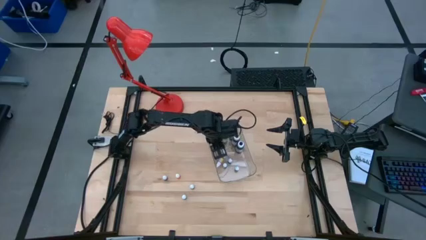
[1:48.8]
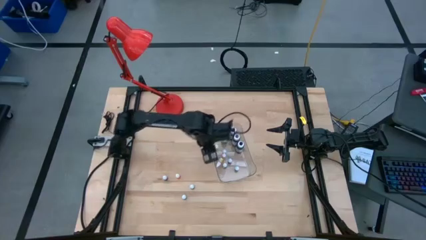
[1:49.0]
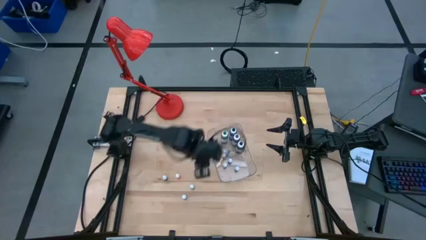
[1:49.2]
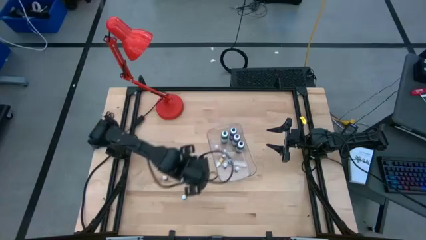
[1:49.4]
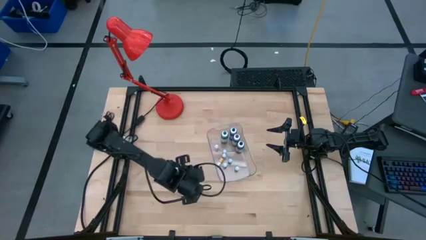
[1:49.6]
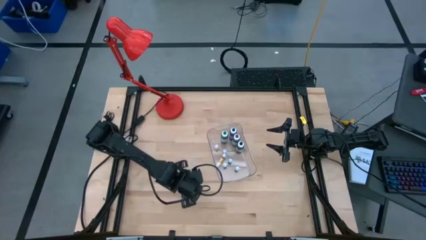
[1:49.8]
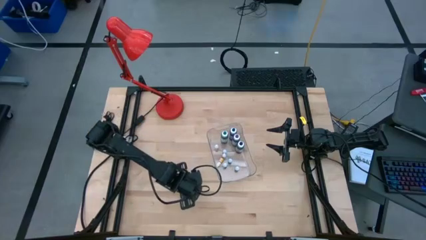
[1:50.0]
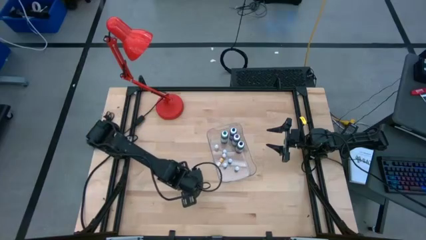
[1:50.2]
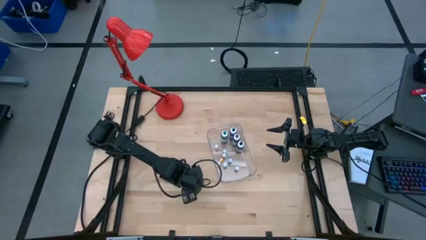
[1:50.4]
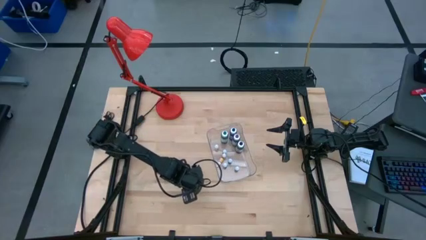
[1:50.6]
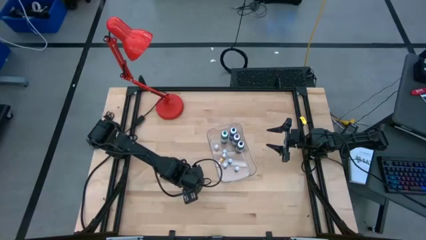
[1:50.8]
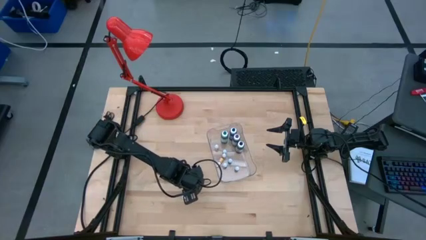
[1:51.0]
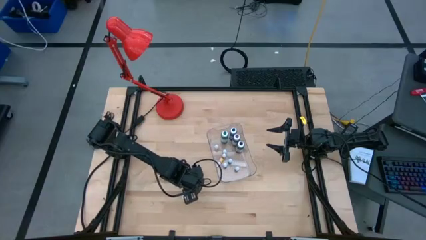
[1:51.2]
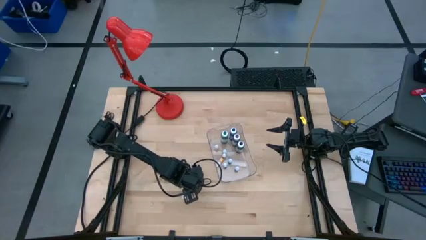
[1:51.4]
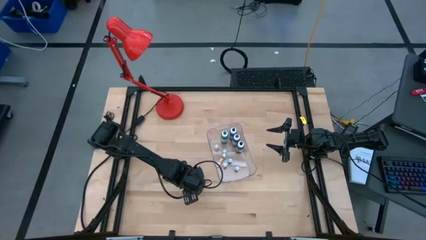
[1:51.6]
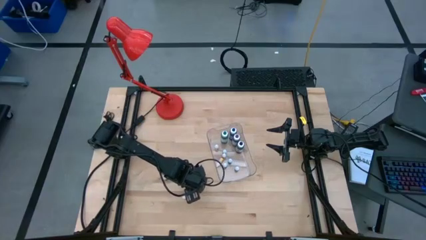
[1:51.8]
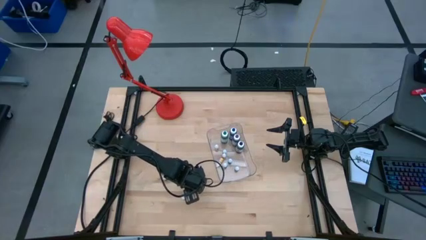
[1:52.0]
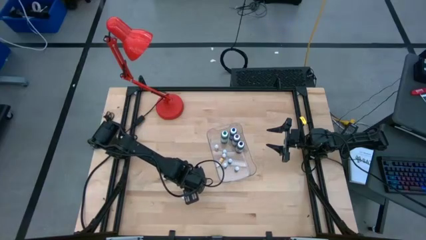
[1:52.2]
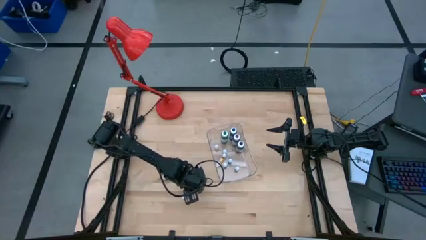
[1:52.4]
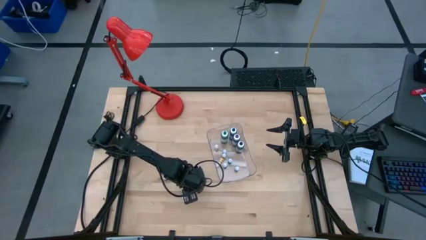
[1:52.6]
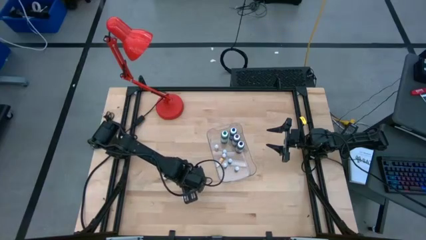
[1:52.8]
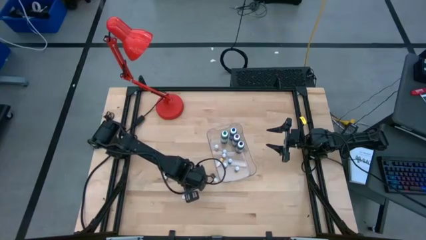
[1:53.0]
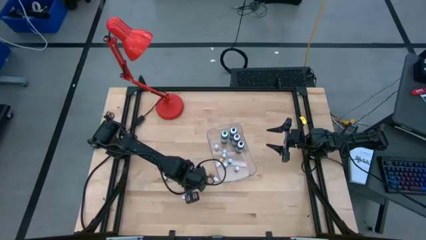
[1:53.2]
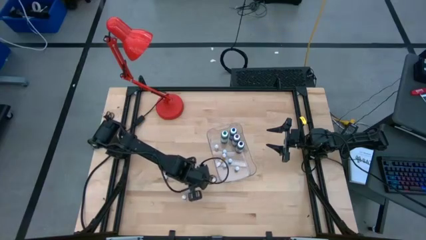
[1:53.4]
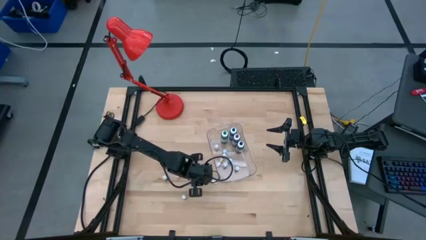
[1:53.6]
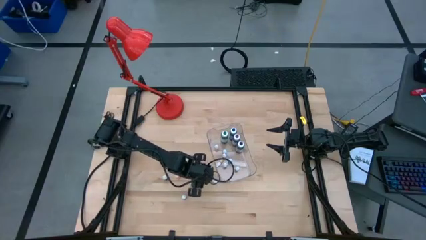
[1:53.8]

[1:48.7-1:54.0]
Task: Pick & Place food coloring
Put the purple food coloring bottle into the transparent container

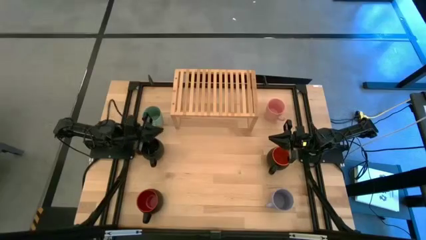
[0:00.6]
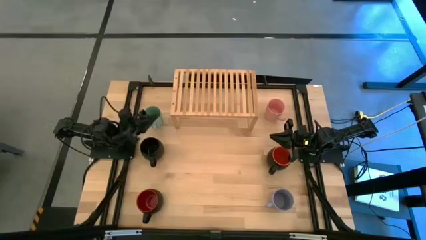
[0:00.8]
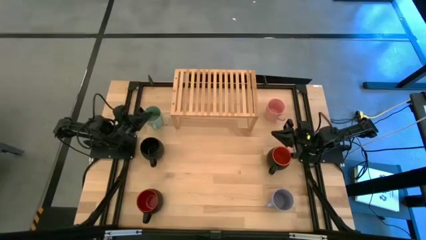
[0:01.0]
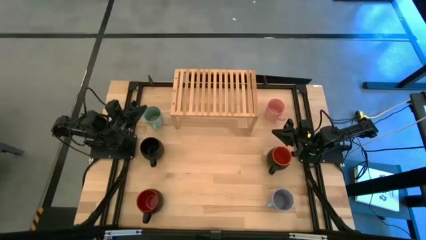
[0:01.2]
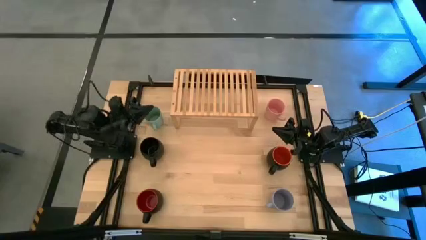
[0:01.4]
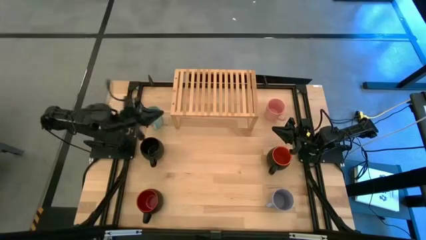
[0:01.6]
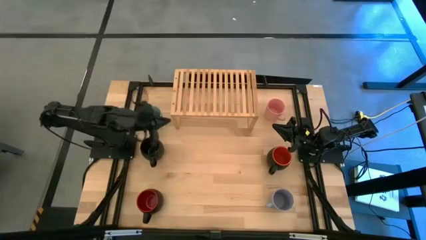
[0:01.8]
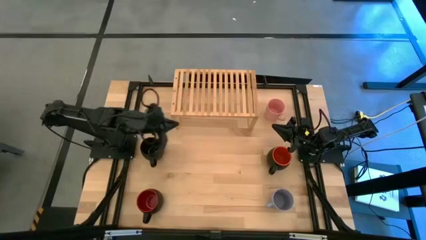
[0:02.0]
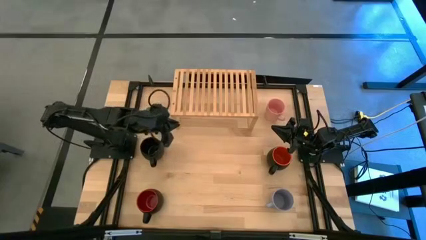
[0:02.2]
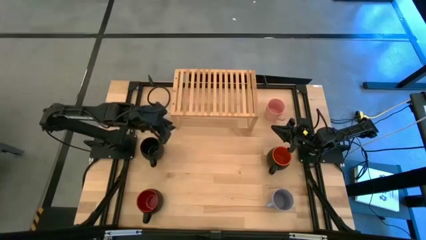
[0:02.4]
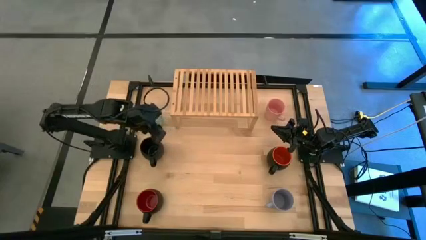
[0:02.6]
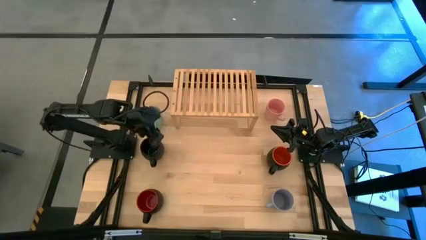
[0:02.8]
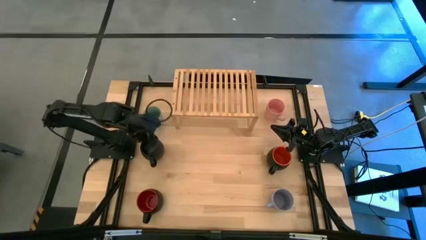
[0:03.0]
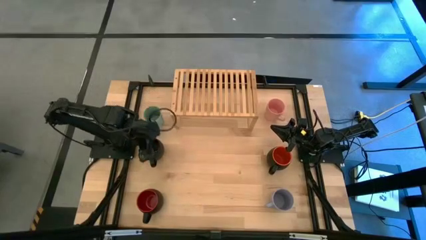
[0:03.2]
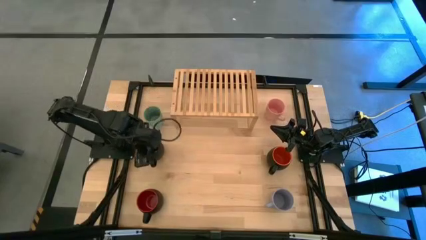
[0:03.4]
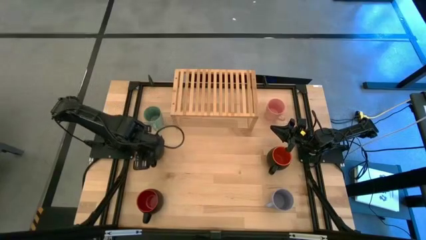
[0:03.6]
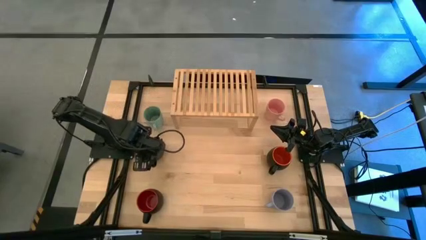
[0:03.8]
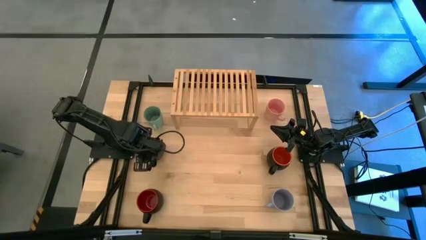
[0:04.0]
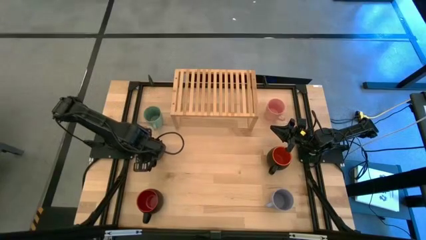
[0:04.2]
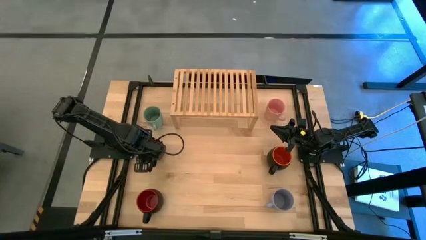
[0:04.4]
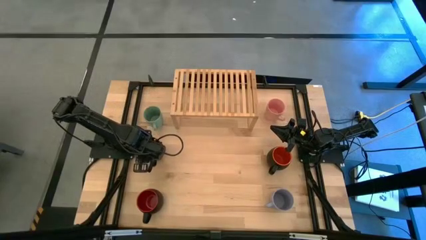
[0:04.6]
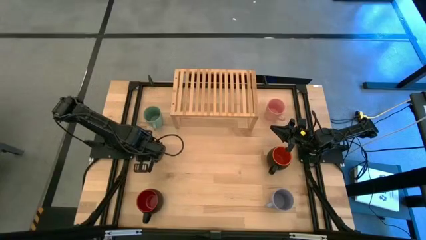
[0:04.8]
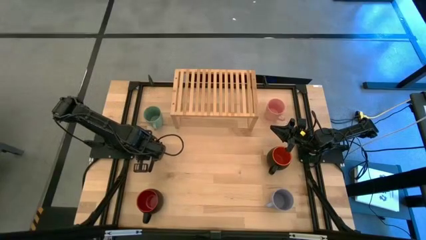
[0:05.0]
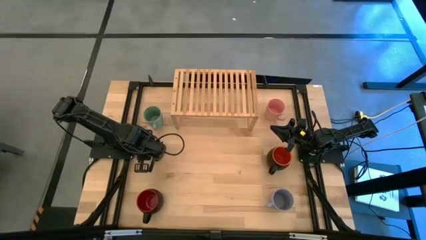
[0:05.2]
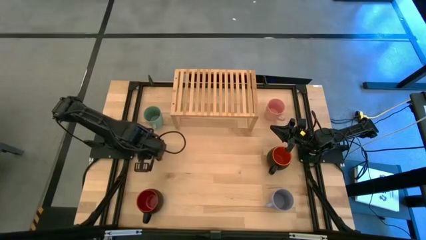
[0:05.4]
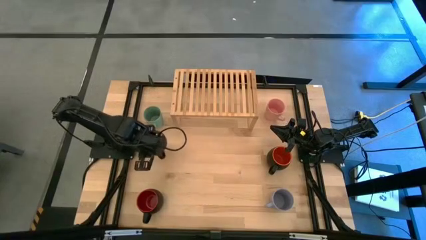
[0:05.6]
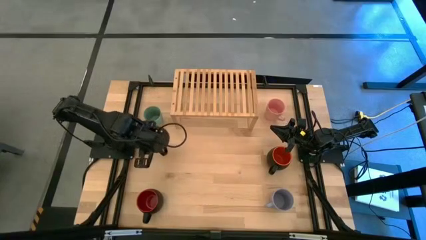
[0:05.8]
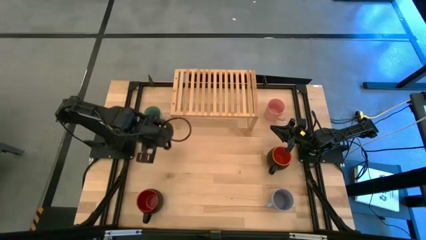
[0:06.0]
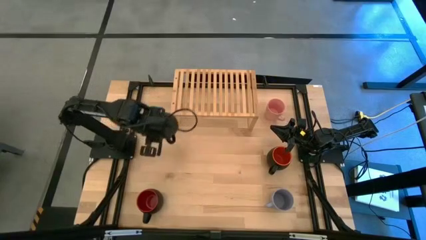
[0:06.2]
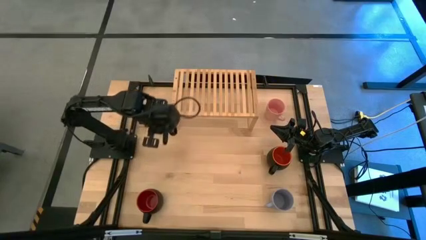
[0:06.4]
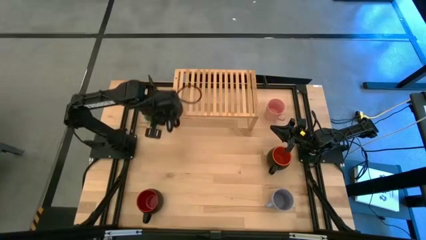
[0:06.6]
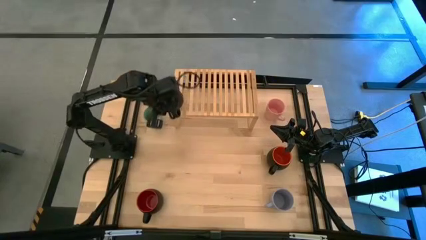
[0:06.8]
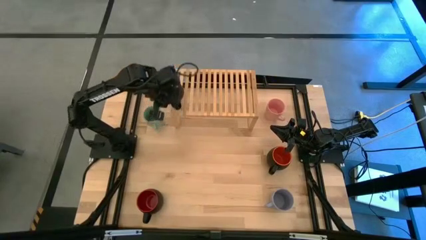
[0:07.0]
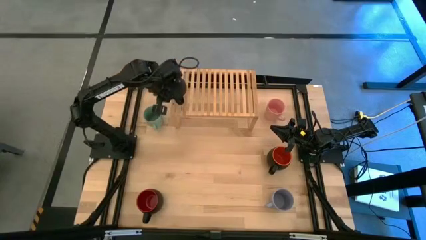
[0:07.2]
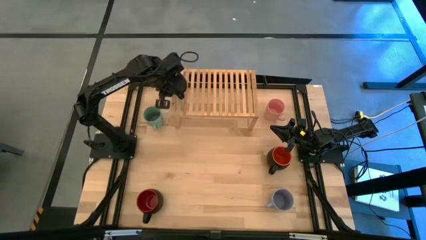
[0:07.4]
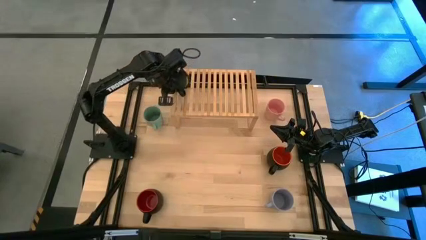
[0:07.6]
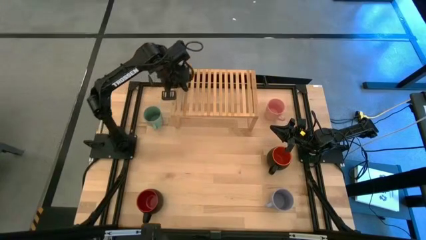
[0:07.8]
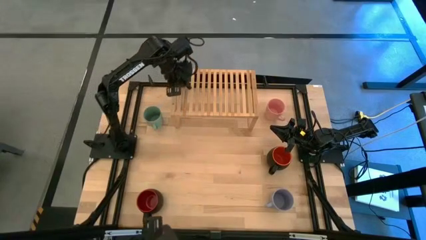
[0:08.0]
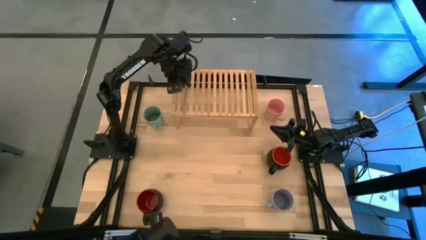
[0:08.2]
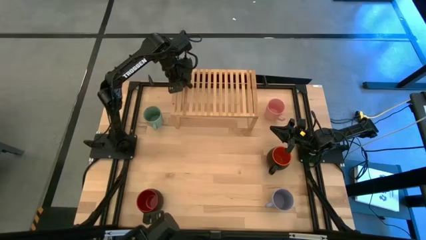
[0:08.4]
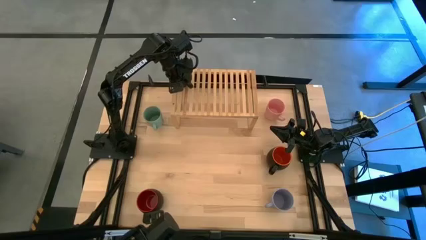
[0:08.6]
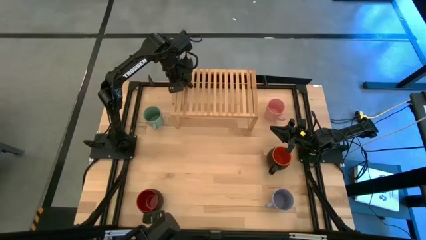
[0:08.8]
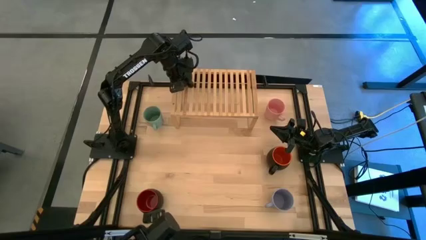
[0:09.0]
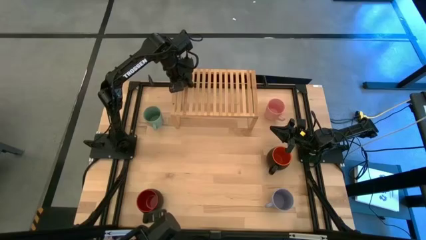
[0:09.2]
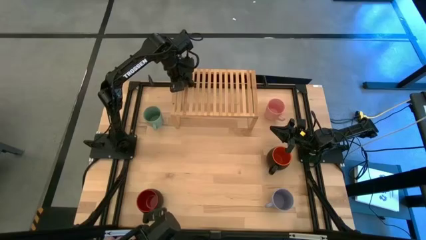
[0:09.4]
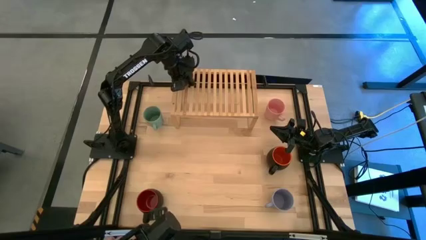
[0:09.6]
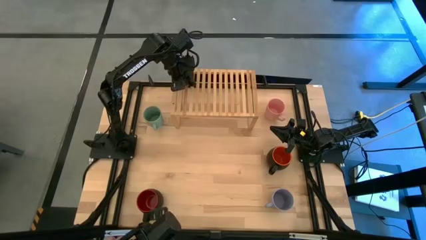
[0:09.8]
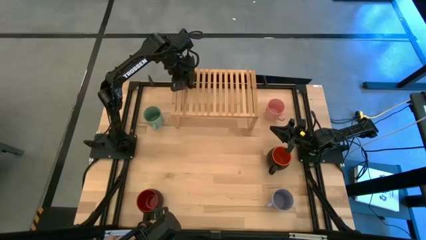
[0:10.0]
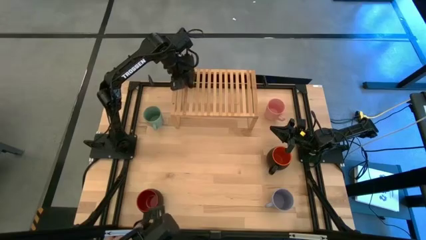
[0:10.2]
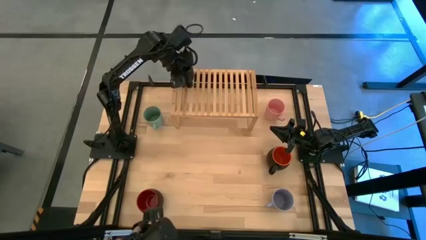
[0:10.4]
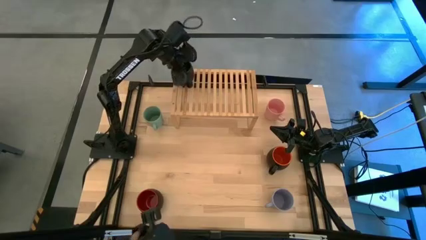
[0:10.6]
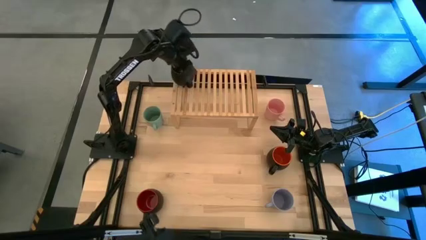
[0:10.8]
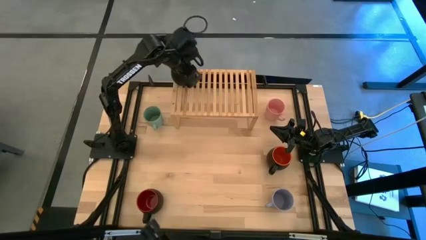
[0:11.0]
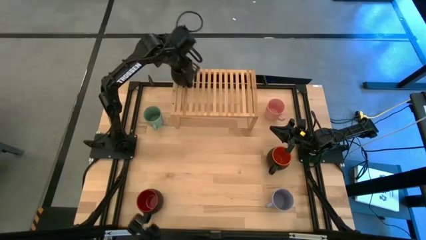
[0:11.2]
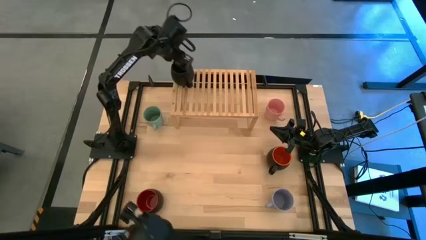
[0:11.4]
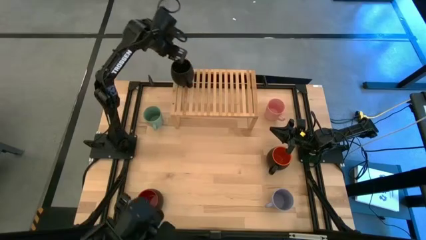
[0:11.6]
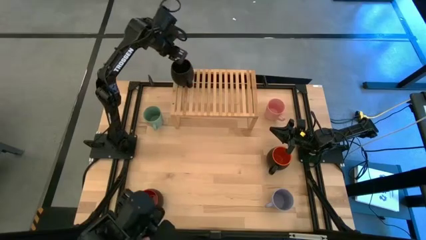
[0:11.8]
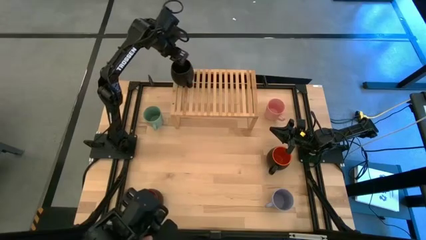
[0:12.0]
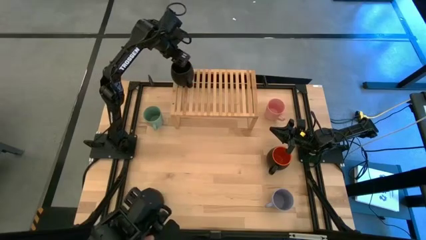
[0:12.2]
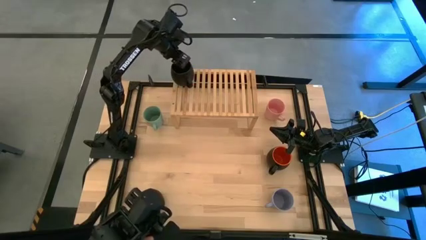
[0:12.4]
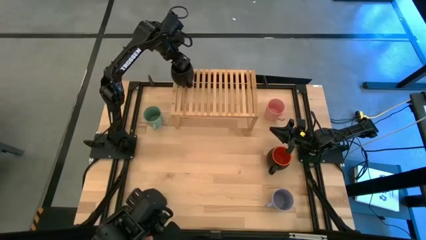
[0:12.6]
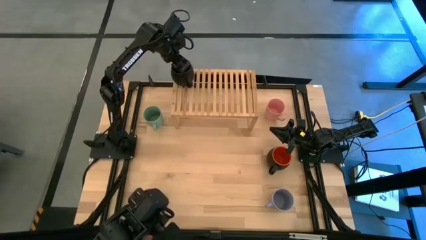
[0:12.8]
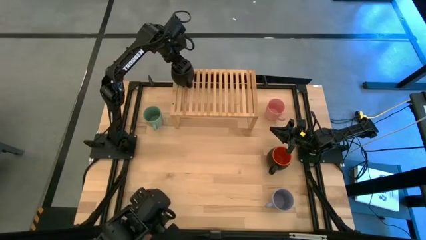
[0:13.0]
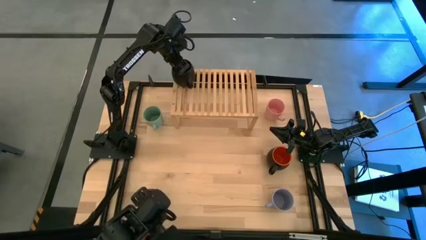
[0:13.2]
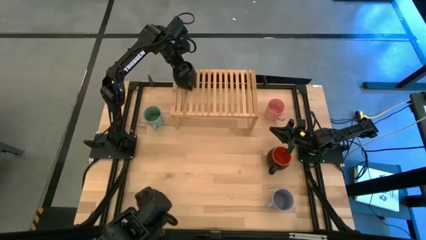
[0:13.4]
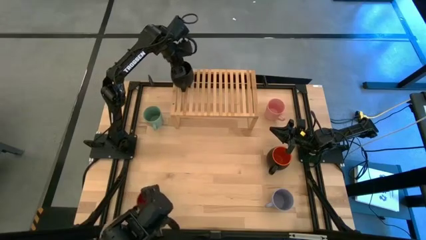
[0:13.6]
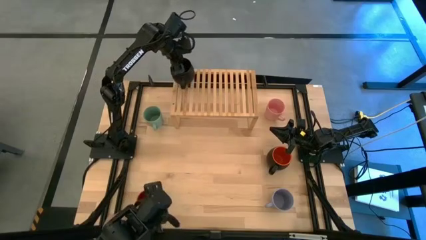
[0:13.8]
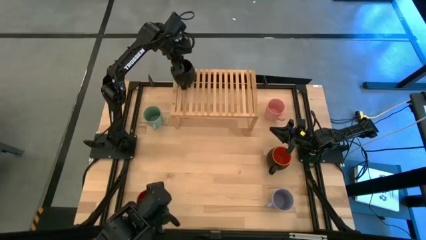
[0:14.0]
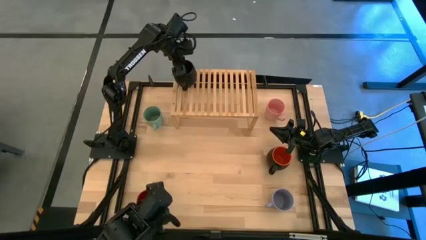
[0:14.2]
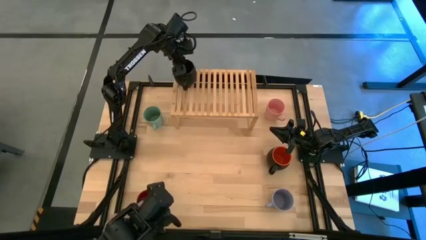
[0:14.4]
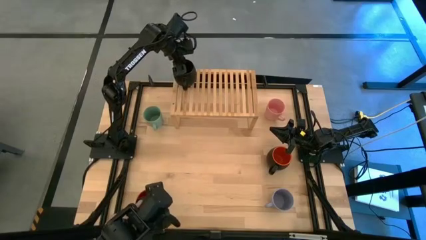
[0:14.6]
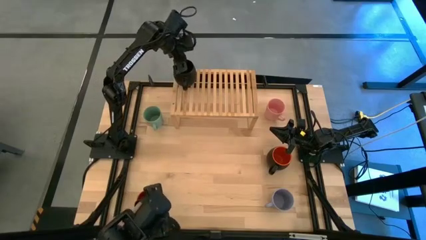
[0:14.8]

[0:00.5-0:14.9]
Task: Place coffee mugs
Put the black mug on the shelf
